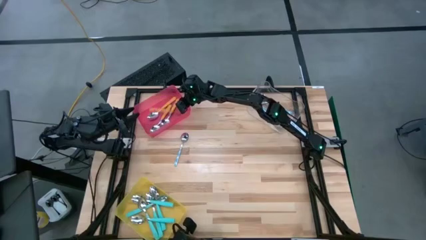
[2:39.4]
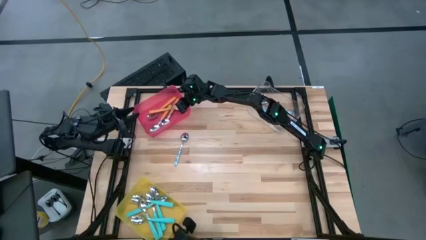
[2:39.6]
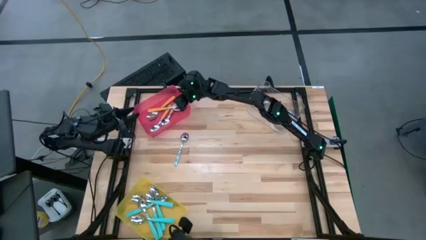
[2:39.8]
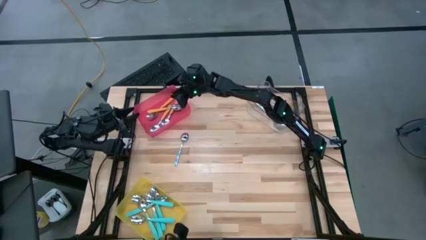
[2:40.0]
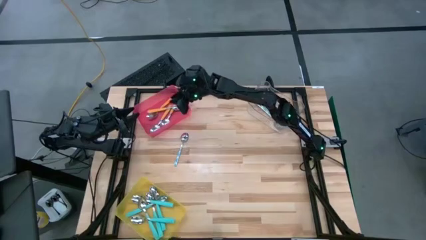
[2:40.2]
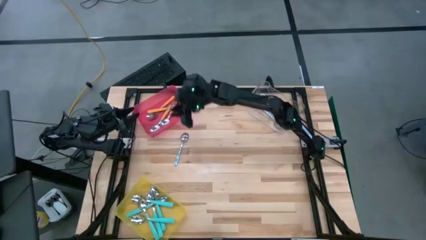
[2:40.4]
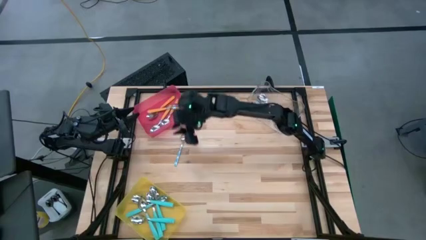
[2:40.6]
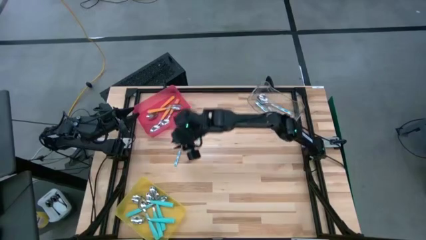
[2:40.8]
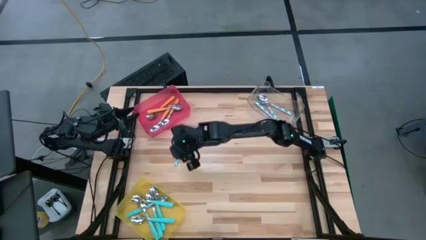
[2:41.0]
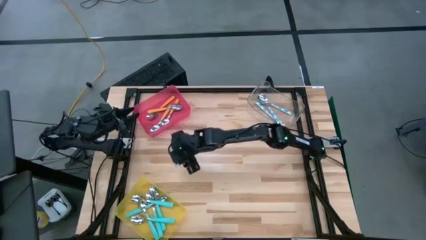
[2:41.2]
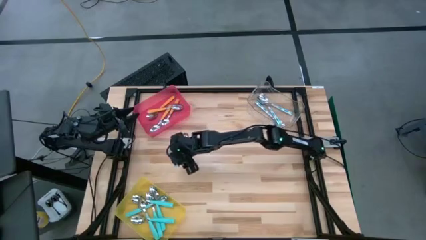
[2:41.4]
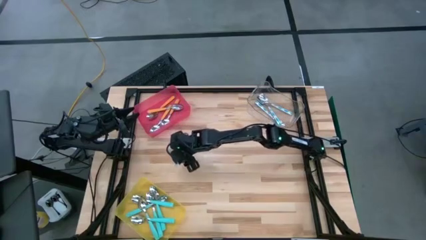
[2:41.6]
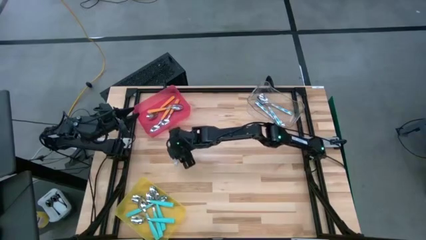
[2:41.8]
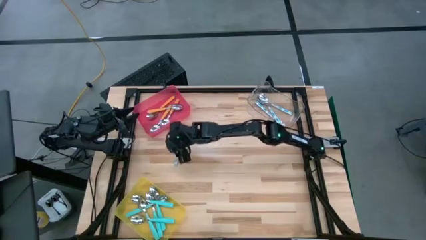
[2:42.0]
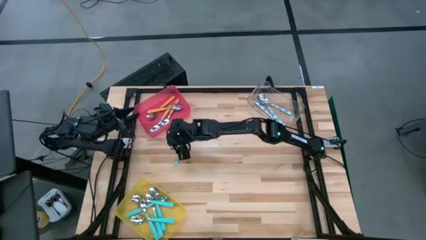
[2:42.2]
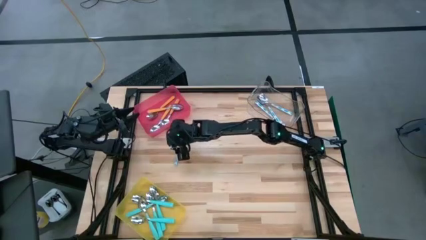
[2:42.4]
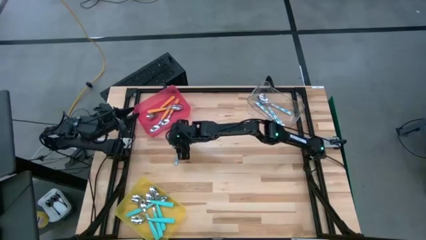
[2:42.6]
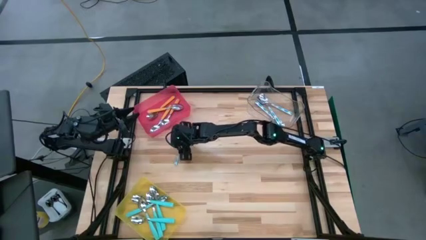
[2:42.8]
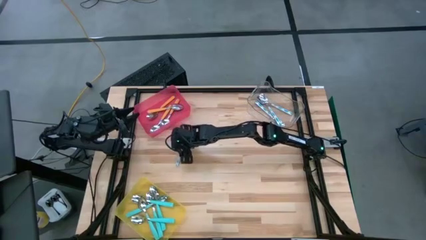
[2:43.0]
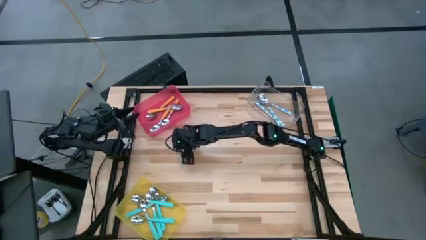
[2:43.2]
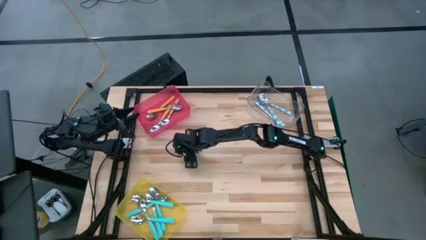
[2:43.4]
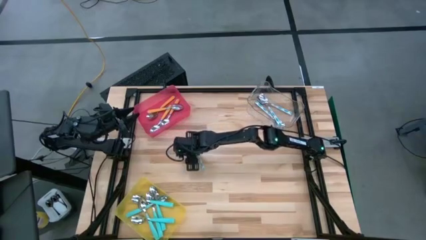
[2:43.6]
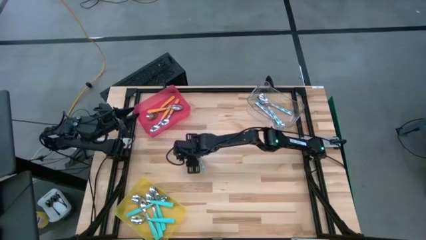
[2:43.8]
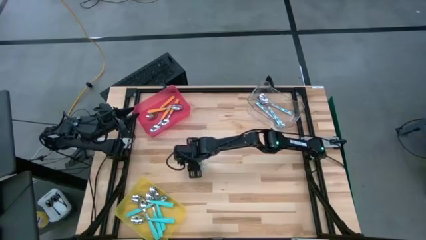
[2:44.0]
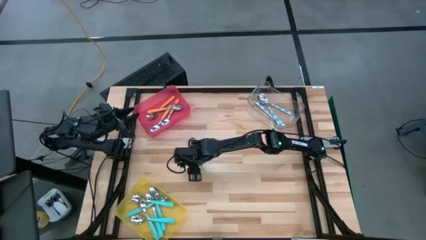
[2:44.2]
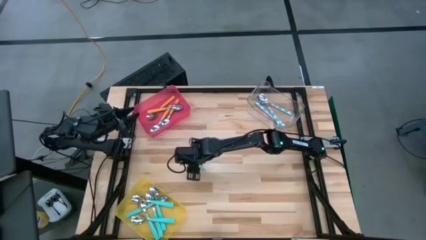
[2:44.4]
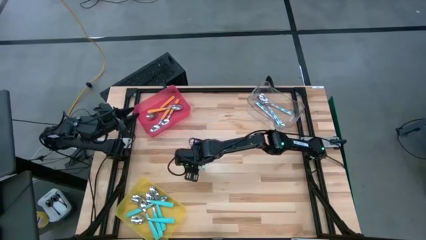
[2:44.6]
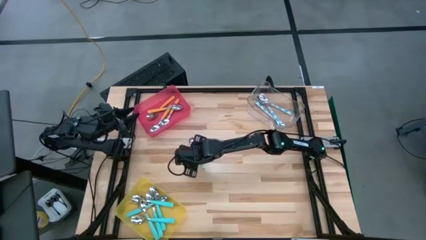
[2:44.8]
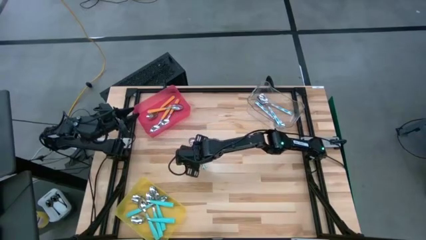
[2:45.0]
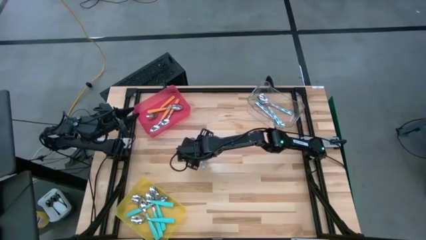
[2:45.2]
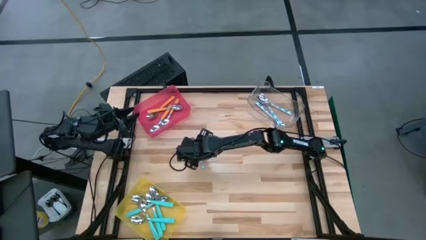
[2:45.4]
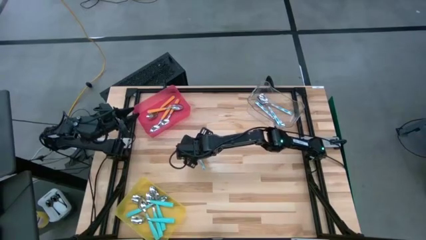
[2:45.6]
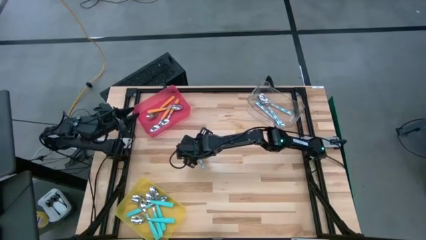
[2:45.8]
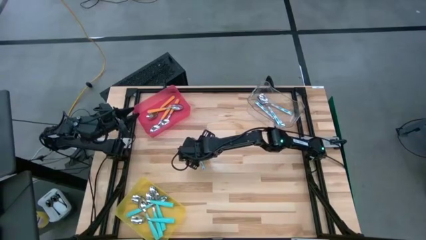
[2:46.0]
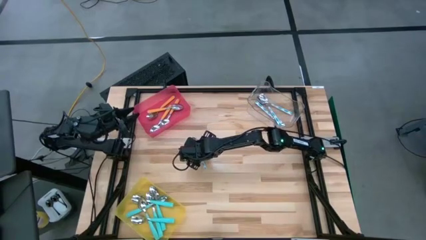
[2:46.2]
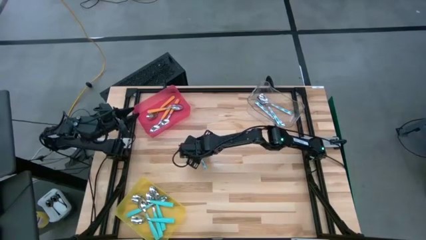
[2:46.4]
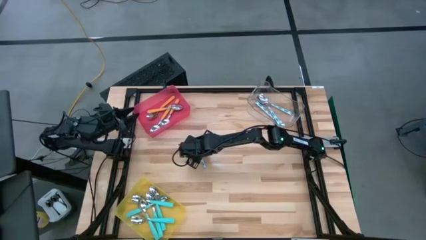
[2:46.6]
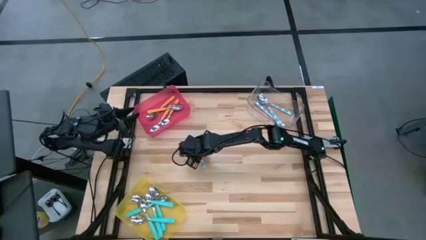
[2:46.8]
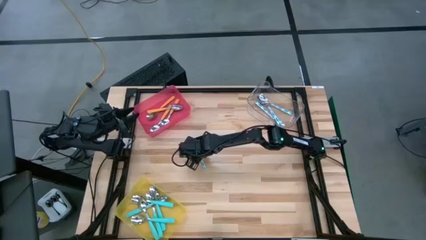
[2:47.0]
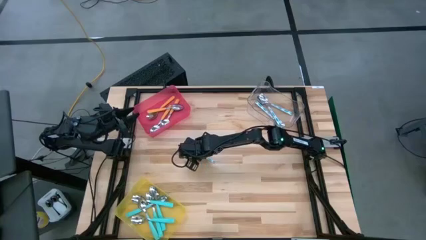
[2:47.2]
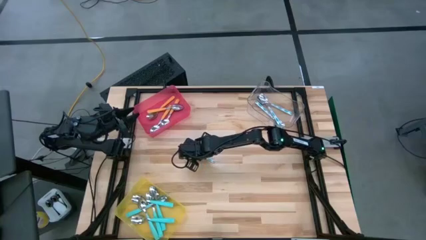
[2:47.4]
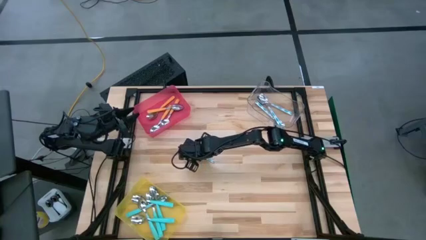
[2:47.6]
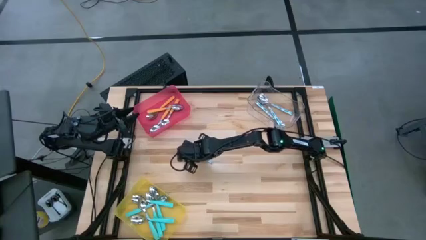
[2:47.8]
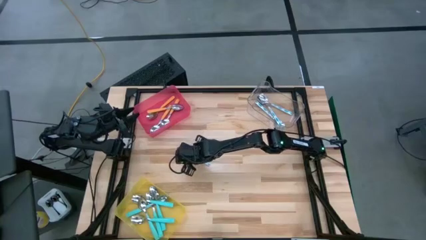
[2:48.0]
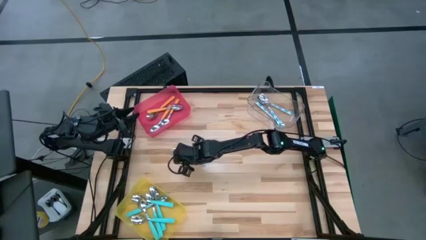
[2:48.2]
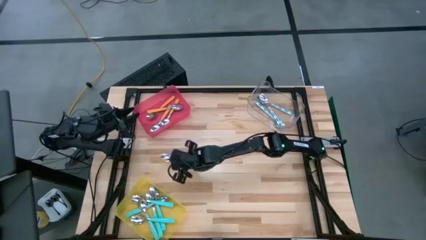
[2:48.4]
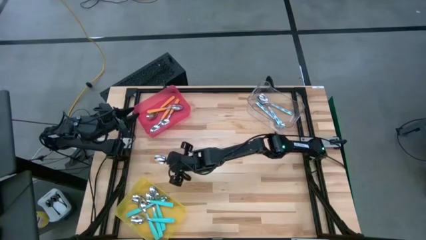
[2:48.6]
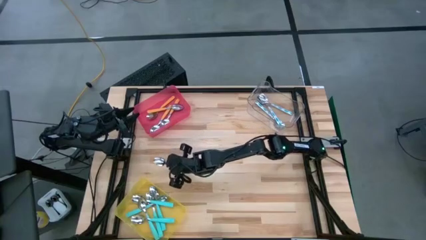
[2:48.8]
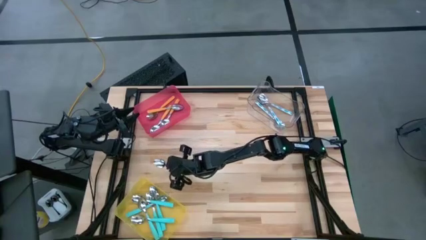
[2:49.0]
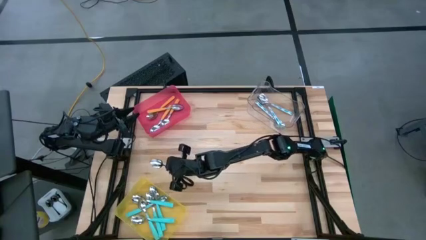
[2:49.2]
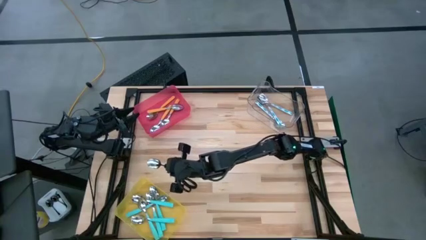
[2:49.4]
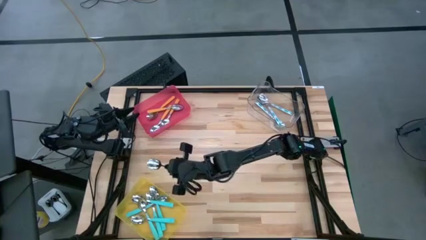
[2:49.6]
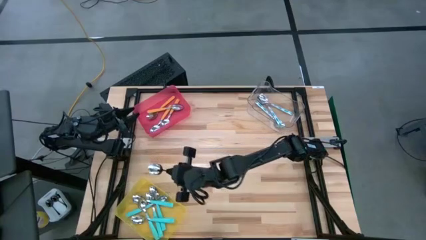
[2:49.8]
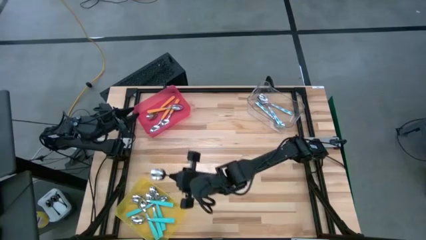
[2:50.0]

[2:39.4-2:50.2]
Task: Sort silverware by color (type)
Put the patterned blue spoon into the transparent bin

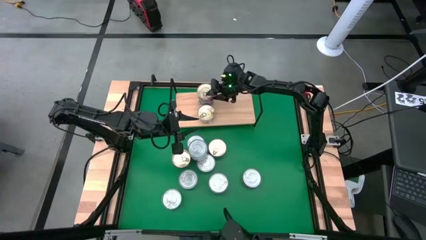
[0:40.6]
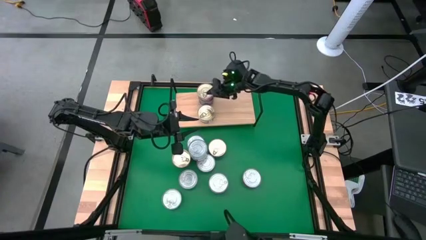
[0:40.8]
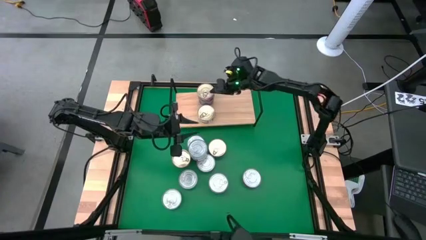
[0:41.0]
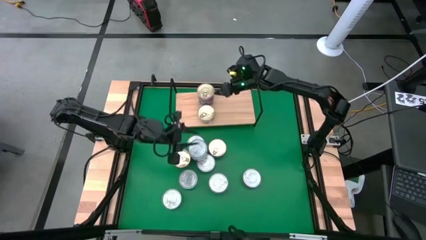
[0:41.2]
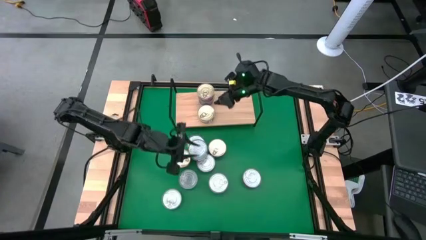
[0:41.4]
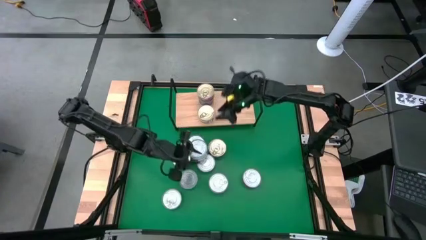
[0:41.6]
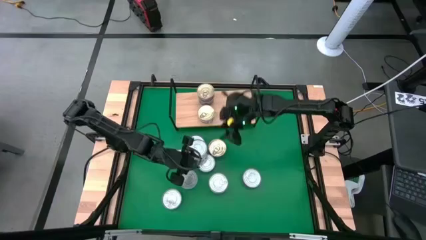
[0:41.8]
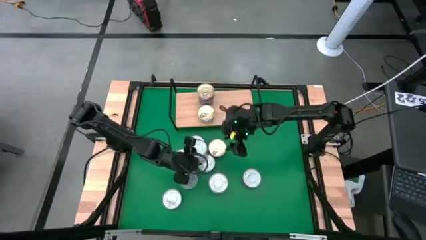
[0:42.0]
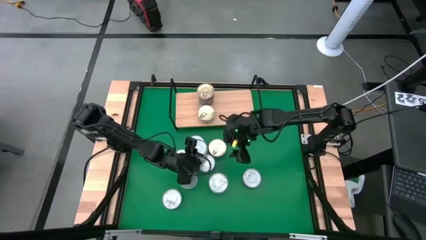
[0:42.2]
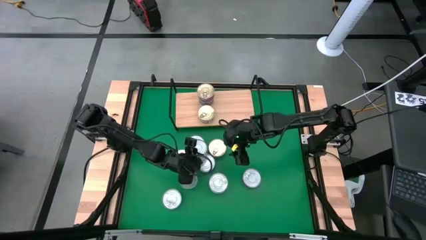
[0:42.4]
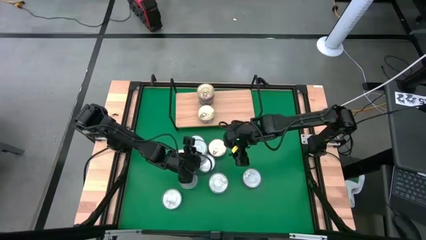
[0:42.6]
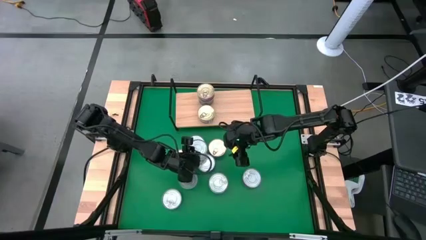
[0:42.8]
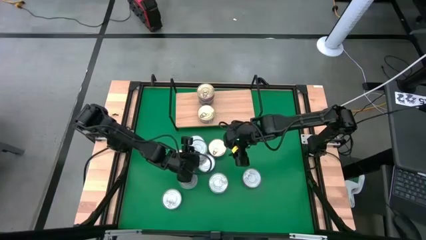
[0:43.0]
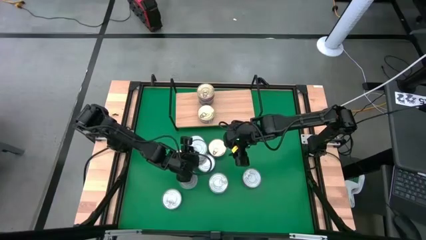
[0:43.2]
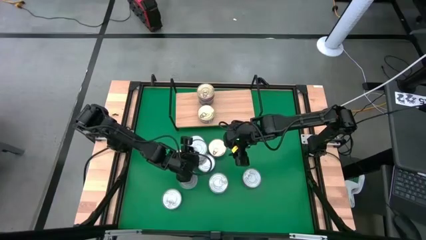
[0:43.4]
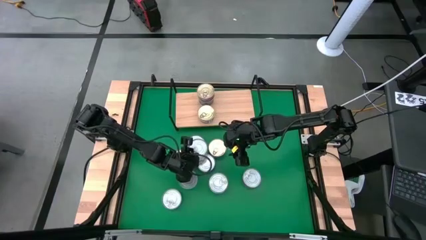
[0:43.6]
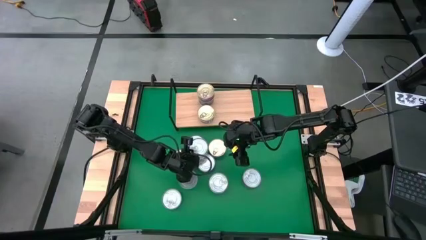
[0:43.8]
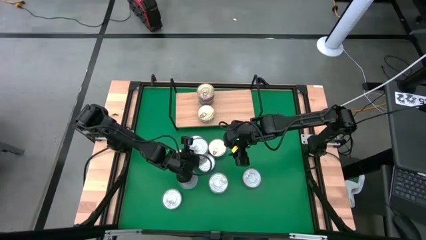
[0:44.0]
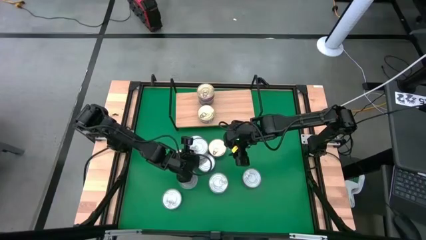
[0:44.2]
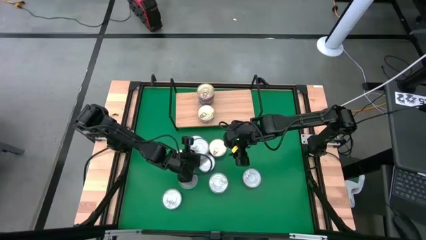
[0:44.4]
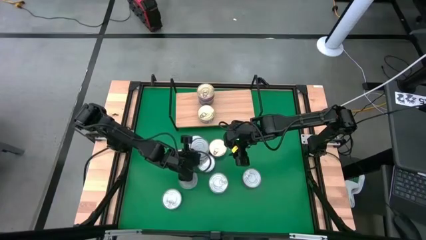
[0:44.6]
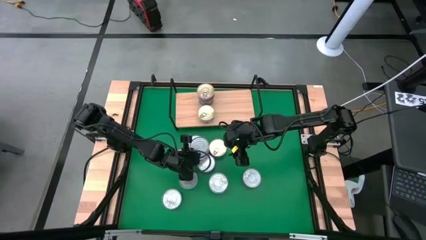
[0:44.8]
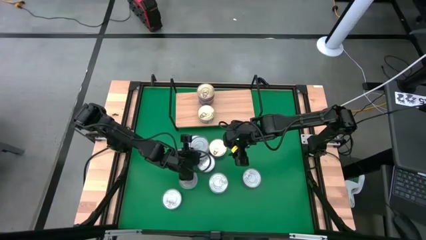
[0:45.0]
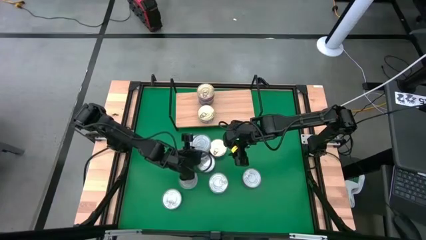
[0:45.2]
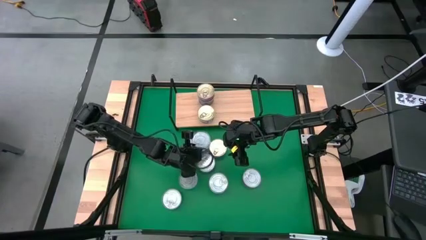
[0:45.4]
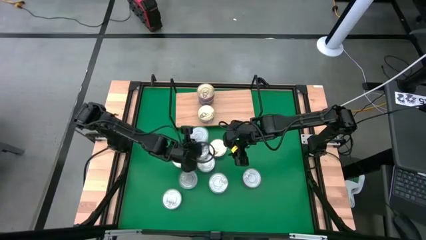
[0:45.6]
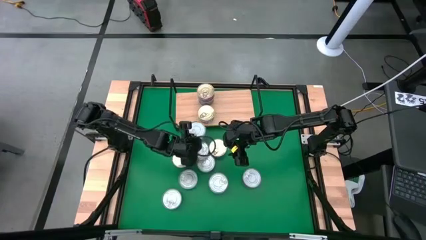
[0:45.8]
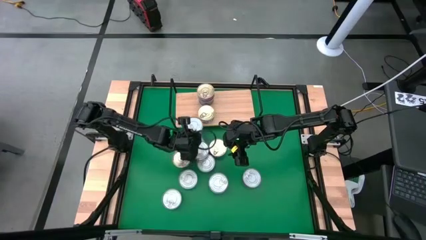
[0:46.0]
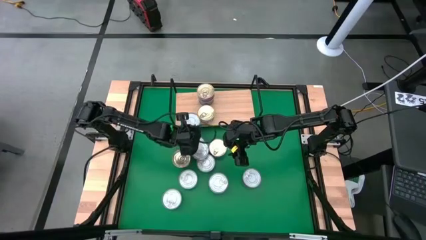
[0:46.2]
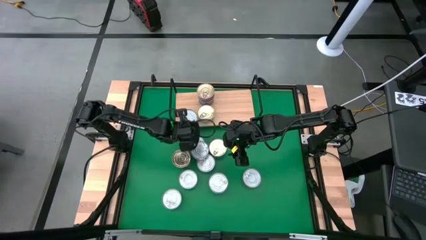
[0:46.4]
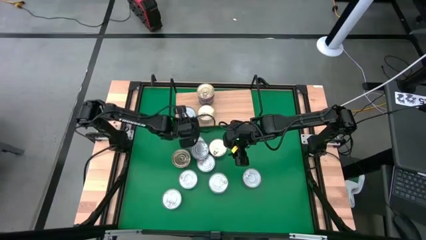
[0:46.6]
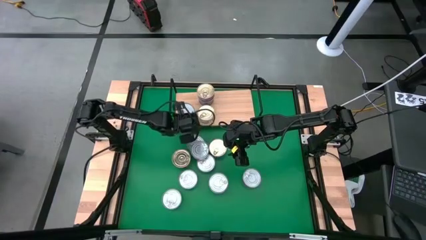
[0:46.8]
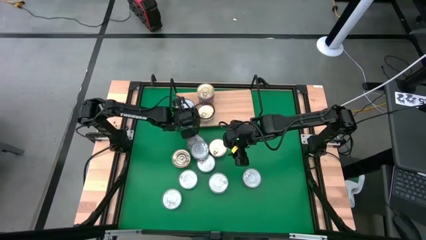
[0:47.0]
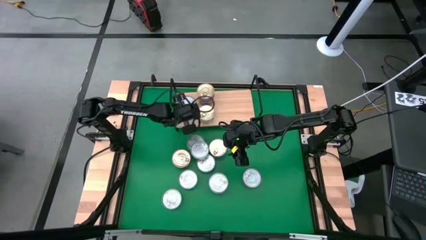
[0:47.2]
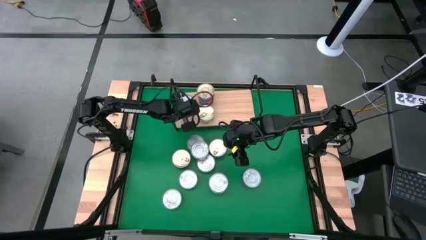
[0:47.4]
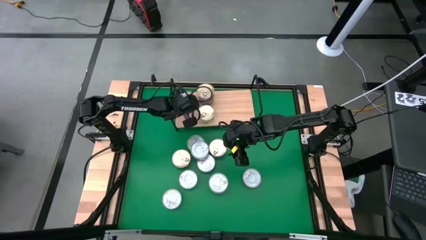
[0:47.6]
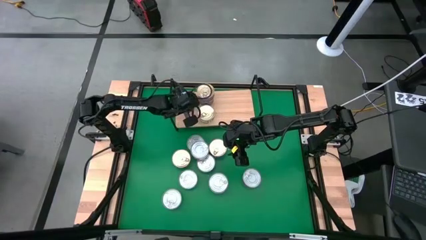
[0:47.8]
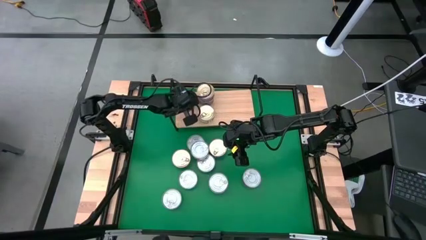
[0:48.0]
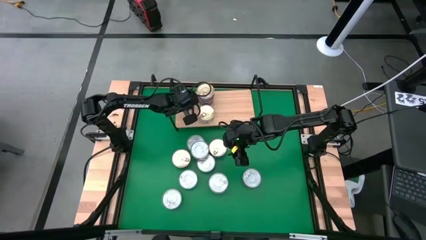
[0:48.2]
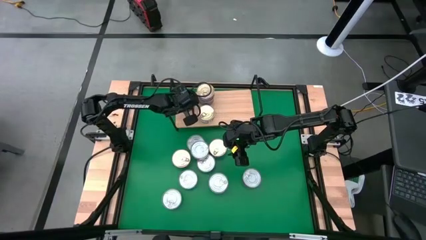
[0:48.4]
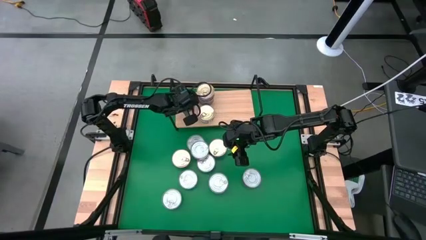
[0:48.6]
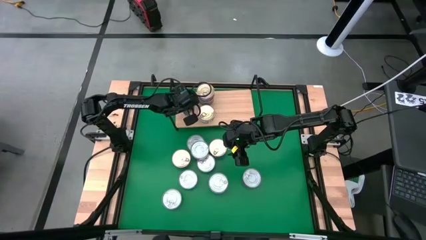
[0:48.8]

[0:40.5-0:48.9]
Task: Stack canned seafood by type on shelf
Put the yellow-blue tuna can on the shelf
